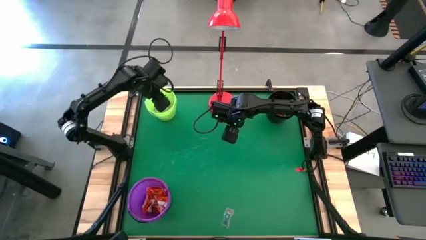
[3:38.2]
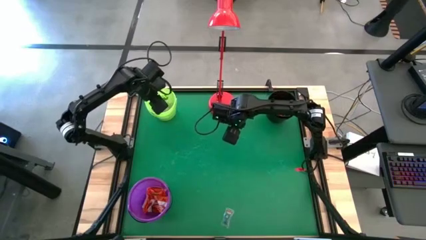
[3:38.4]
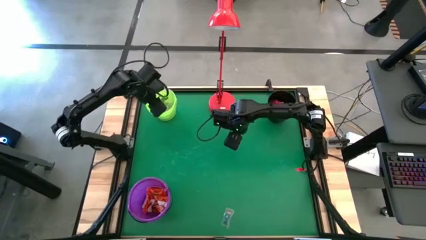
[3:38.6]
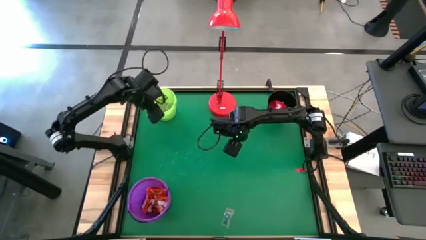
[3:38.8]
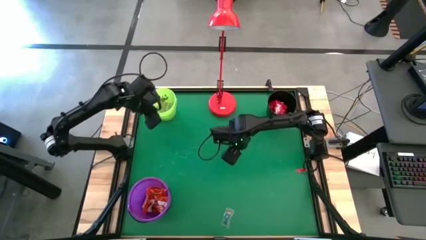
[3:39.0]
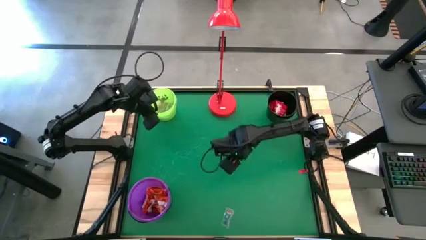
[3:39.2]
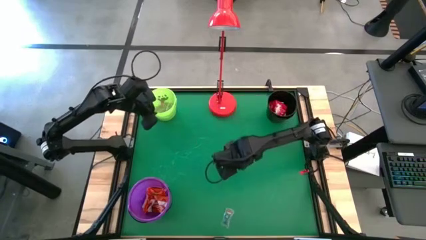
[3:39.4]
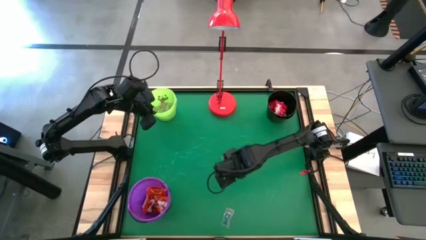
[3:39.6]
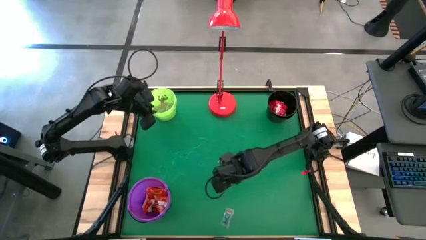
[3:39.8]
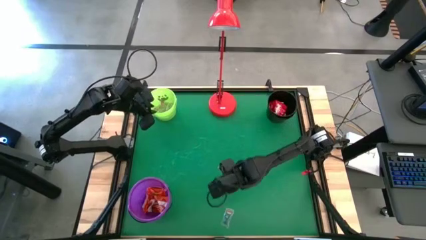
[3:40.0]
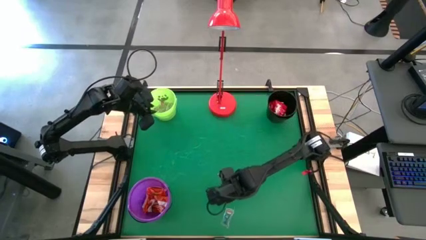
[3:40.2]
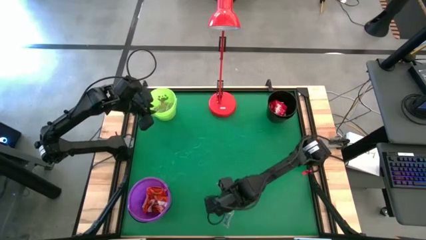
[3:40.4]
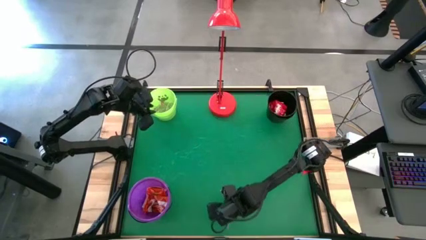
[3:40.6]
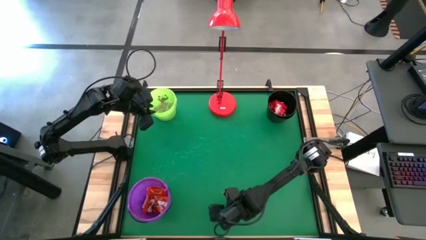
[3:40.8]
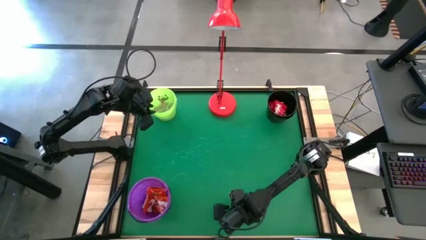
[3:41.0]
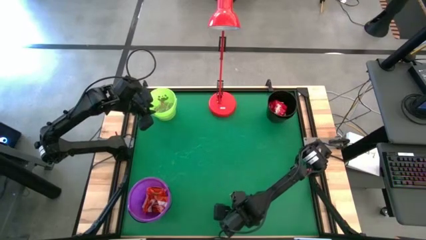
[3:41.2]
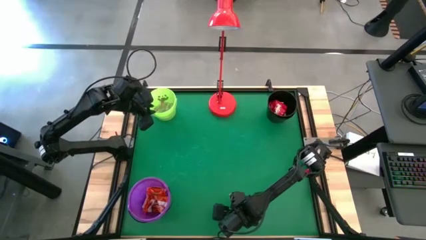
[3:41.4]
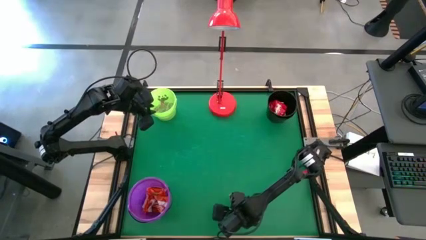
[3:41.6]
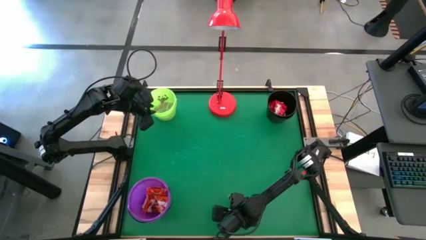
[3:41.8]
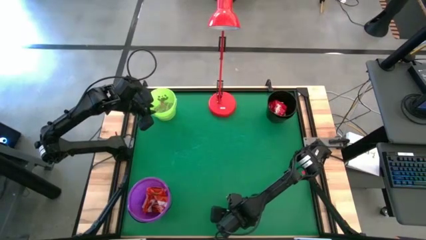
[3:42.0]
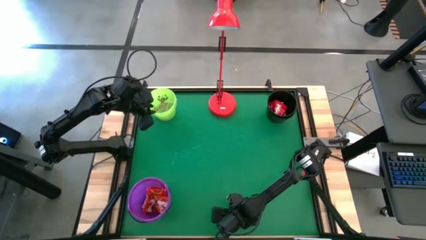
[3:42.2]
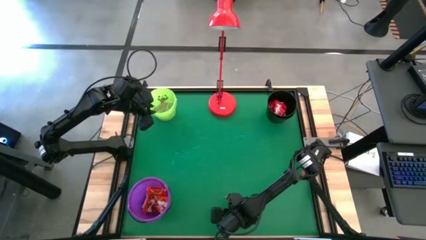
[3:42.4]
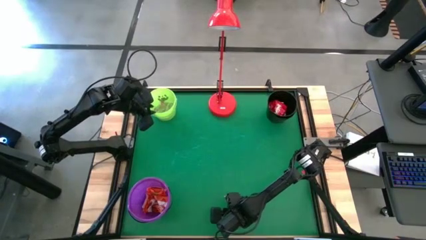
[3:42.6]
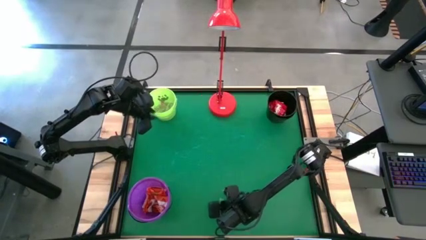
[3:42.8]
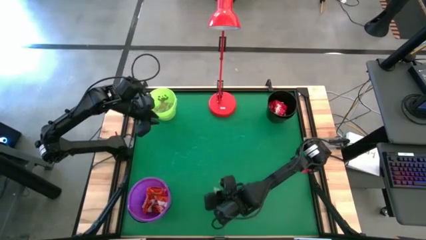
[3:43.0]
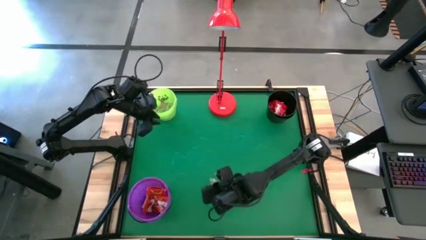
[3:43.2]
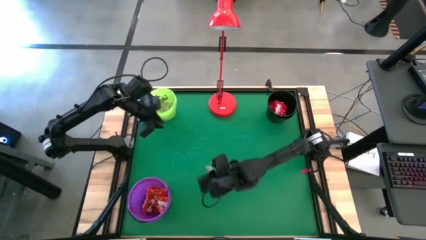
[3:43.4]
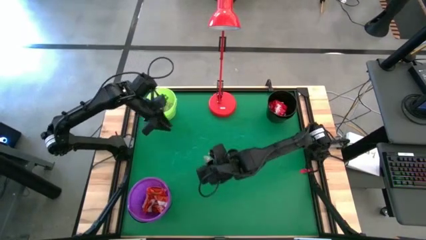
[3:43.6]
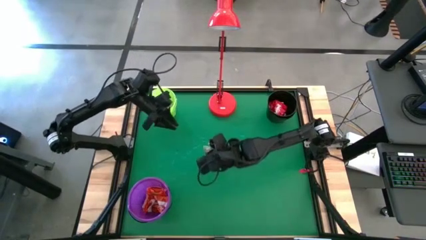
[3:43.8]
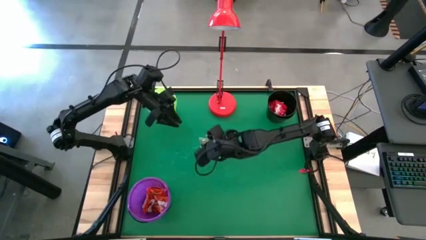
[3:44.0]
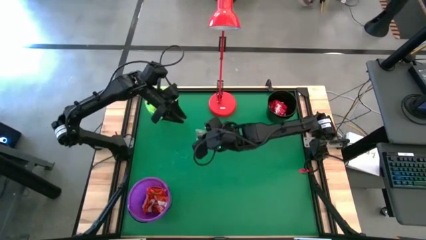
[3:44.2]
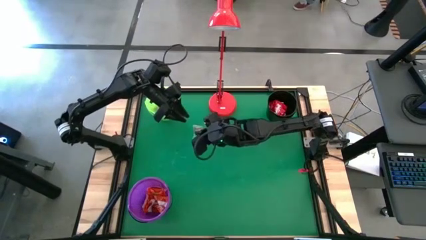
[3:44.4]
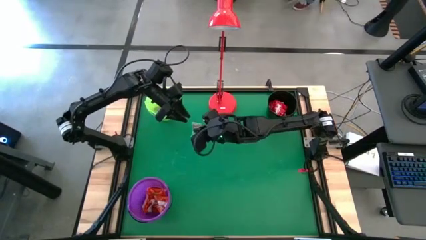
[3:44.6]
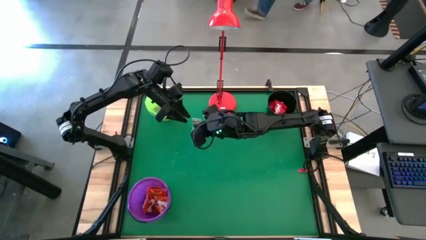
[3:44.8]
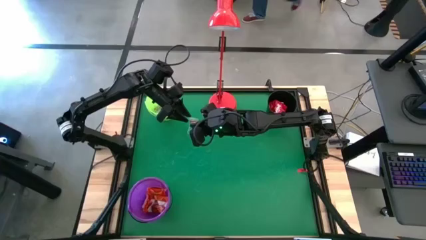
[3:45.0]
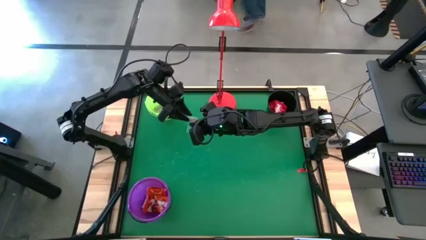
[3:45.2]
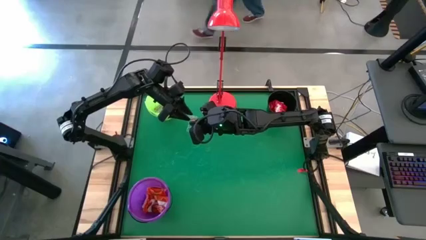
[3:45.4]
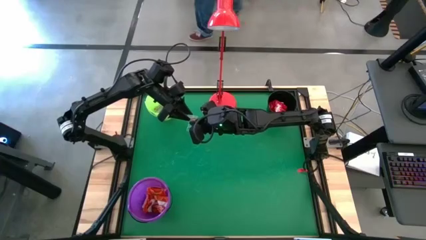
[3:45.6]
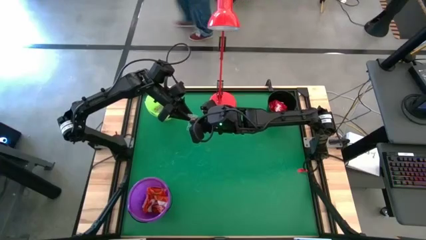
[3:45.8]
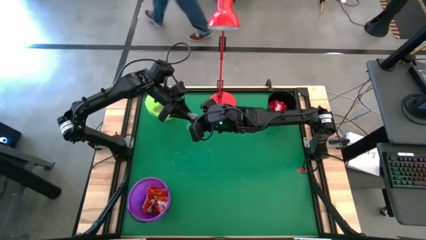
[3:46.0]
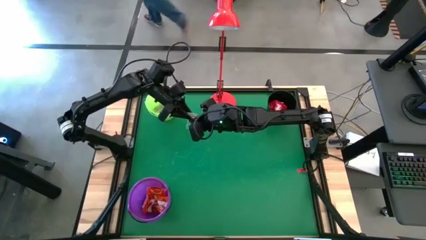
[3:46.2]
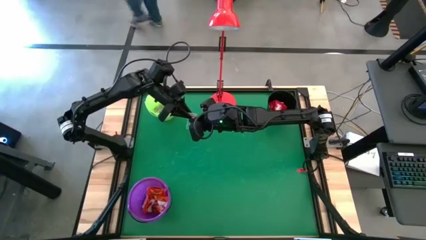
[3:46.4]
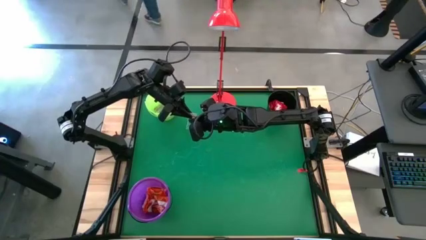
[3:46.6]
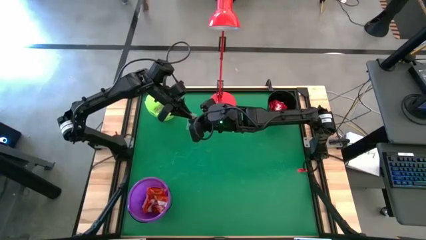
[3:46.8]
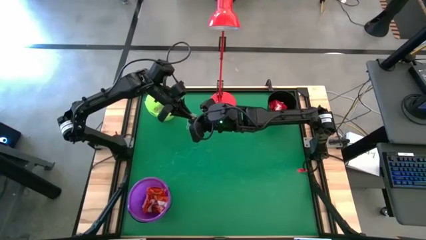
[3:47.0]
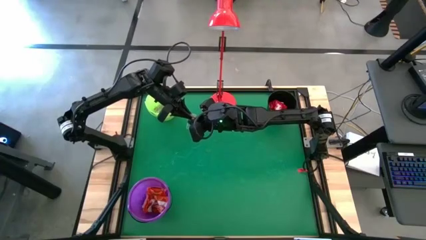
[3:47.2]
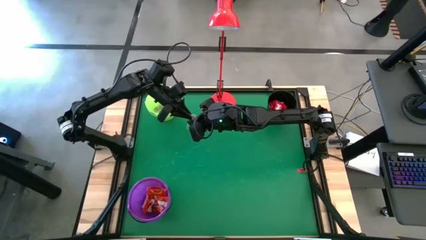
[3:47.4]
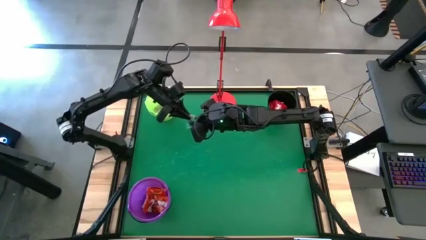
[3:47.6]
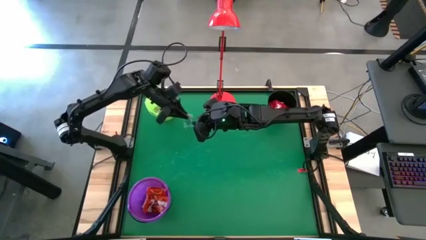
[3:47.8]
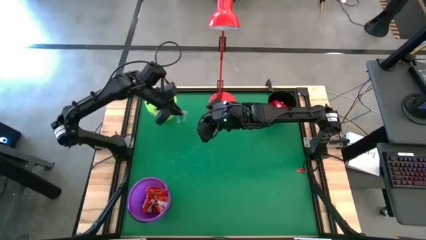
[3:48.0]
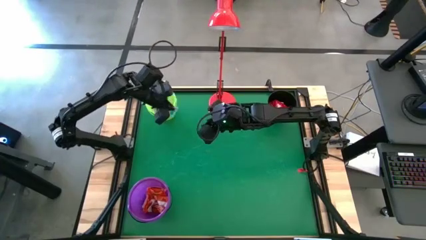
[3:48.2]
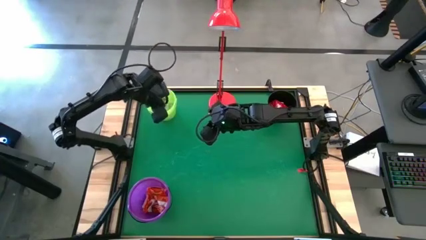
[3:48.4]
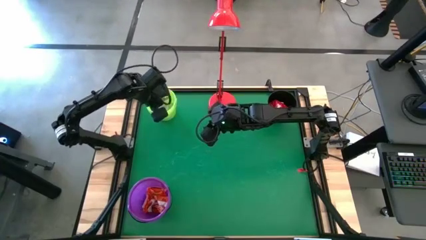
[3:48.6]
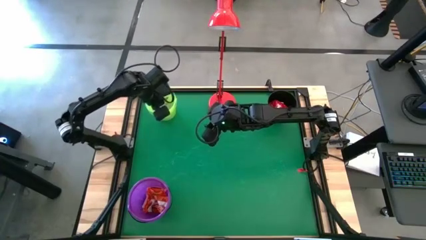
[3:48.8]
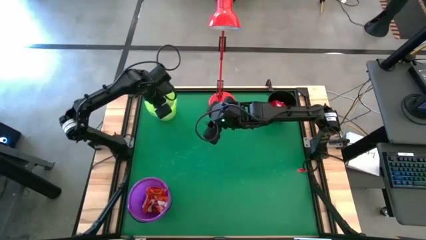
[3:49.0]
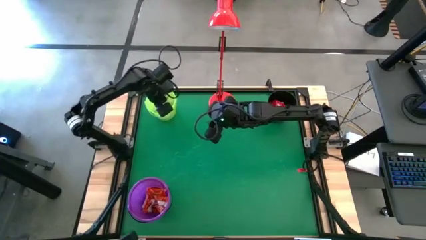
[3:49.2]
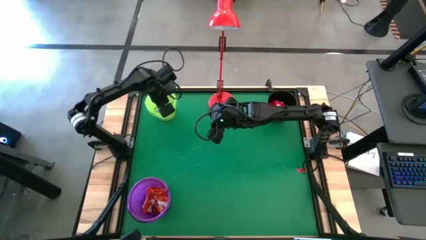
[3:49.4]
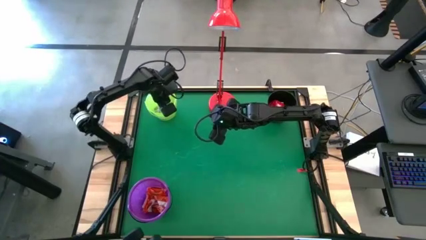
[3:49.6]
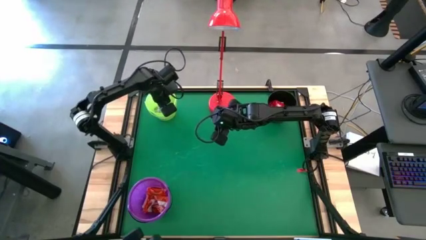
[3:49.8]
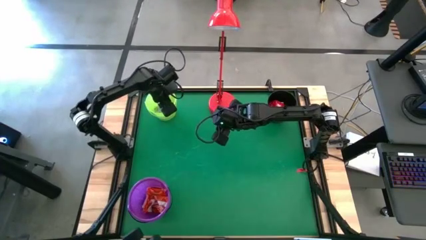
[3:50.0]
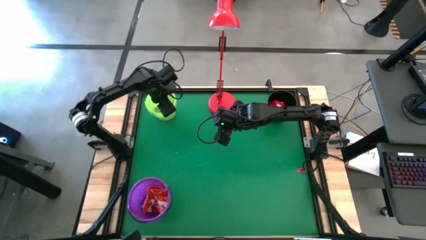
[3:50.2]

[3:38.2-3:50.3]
Task: Sort candy
Put the transparent candy into the green bucket
